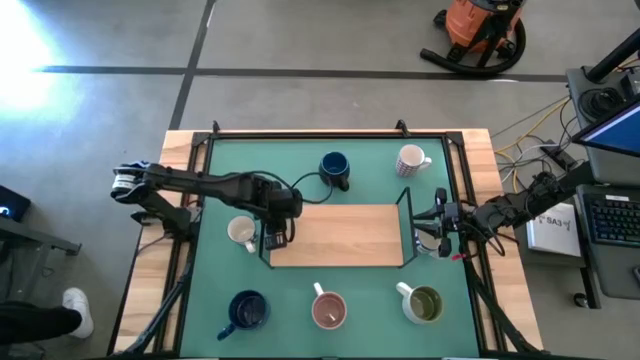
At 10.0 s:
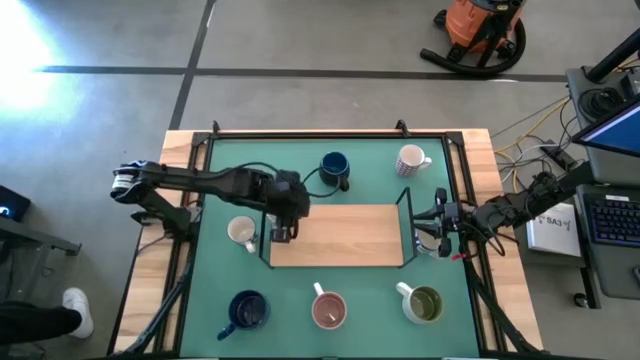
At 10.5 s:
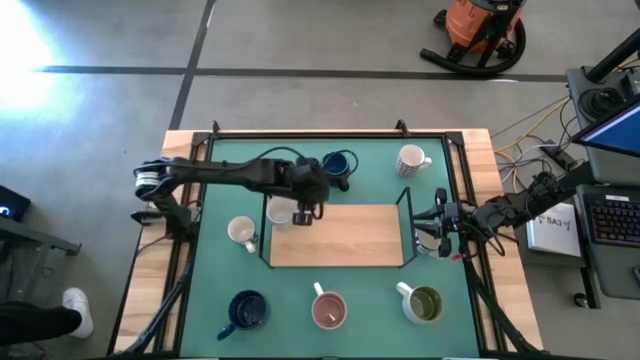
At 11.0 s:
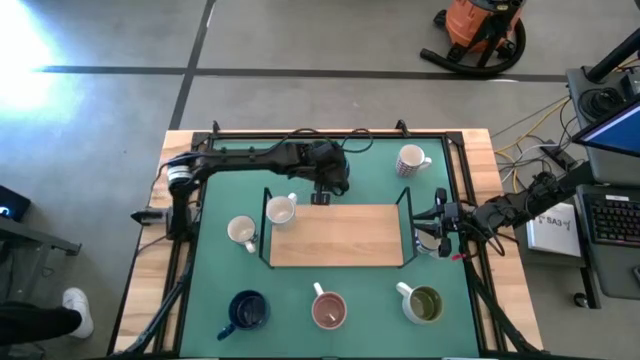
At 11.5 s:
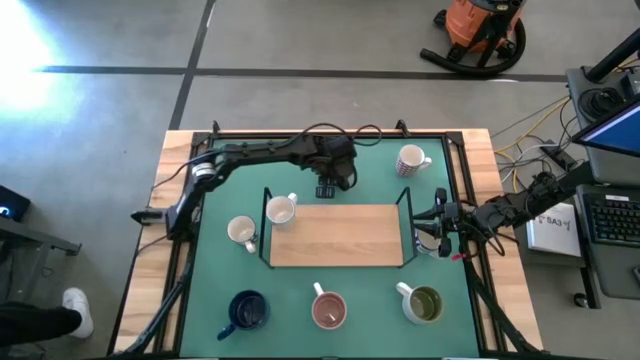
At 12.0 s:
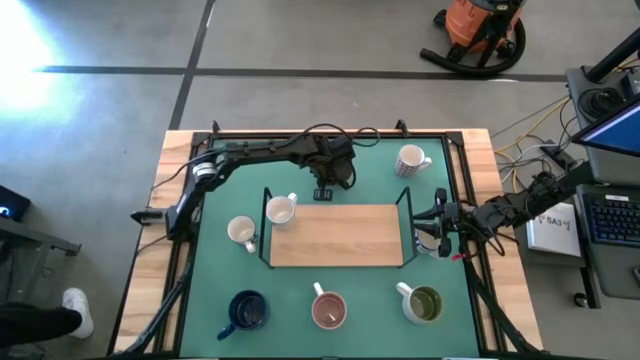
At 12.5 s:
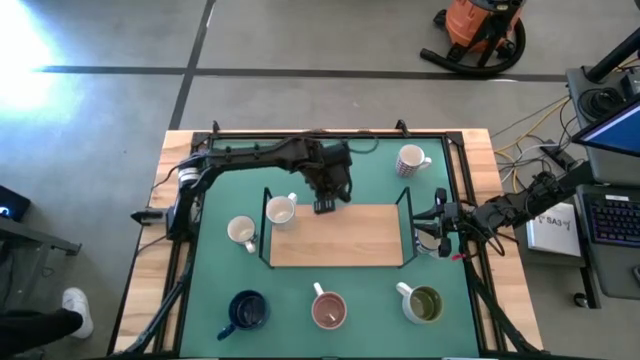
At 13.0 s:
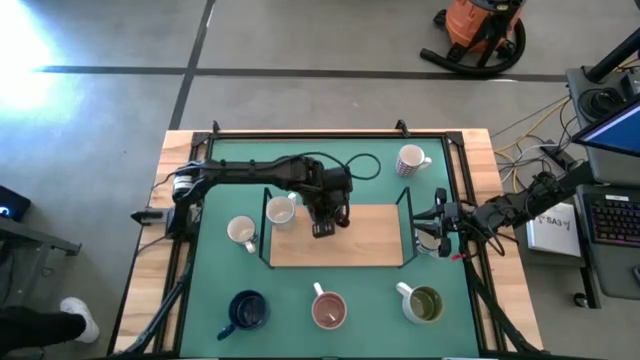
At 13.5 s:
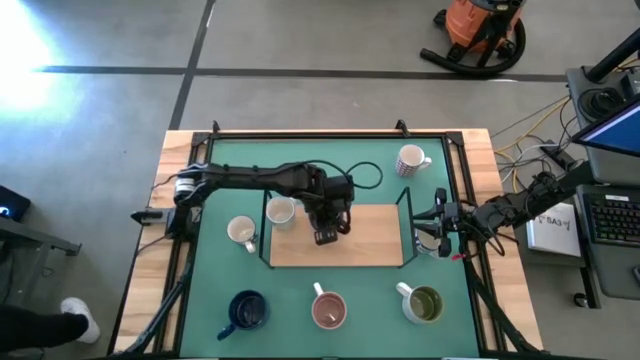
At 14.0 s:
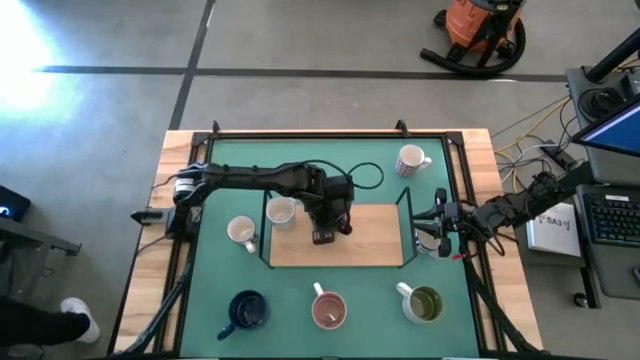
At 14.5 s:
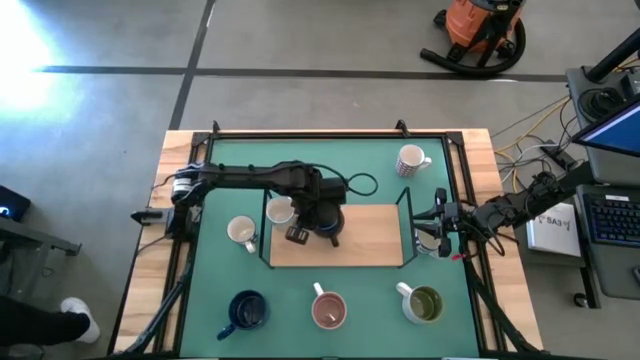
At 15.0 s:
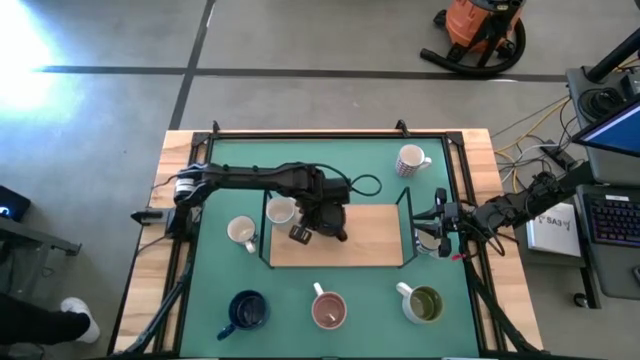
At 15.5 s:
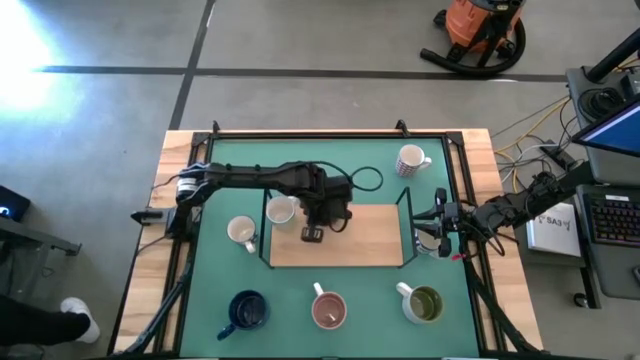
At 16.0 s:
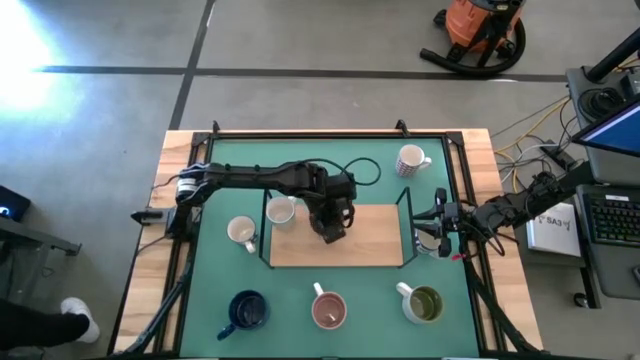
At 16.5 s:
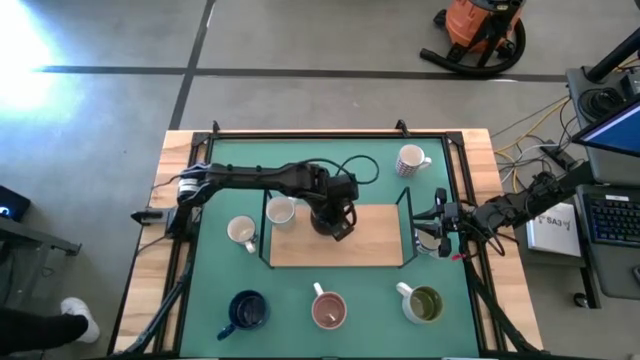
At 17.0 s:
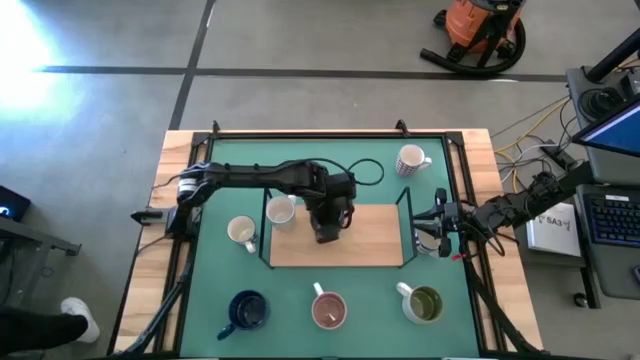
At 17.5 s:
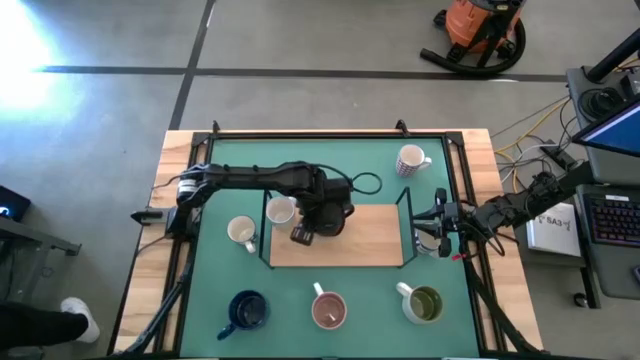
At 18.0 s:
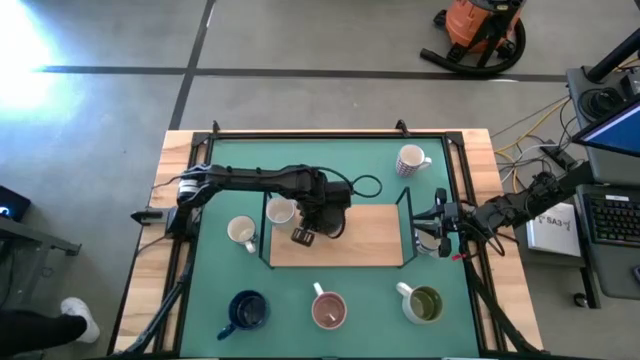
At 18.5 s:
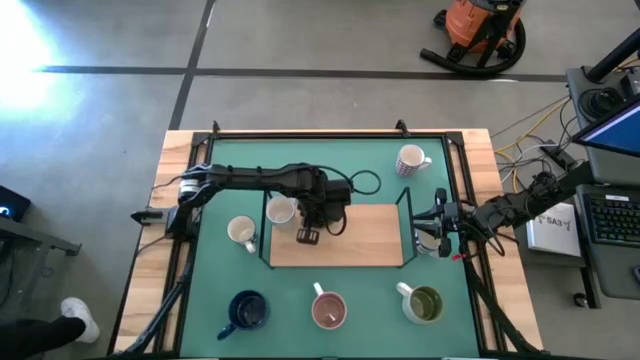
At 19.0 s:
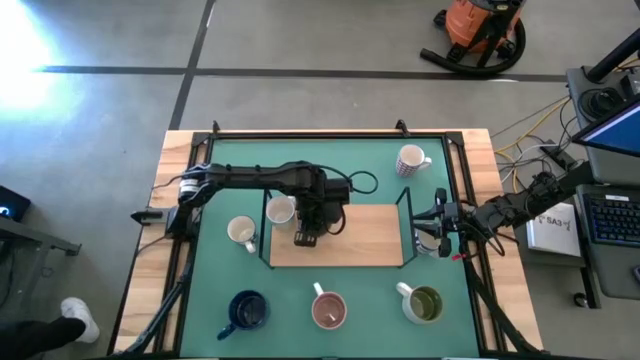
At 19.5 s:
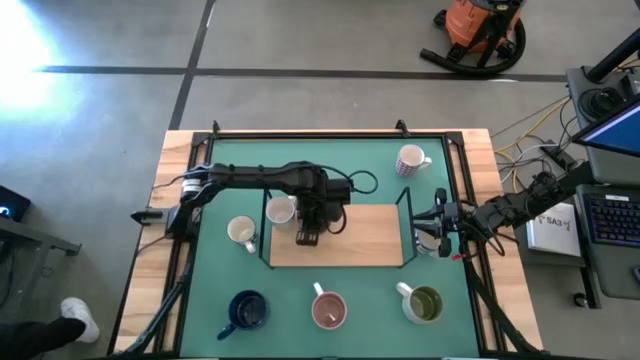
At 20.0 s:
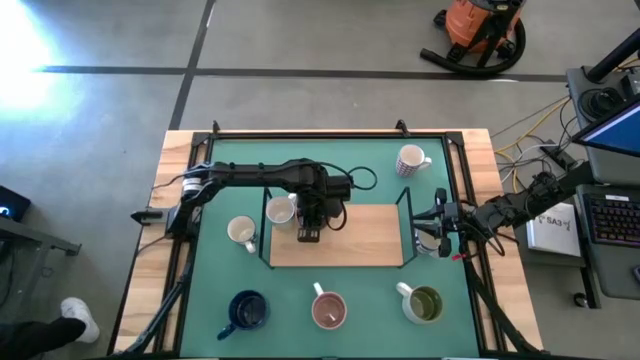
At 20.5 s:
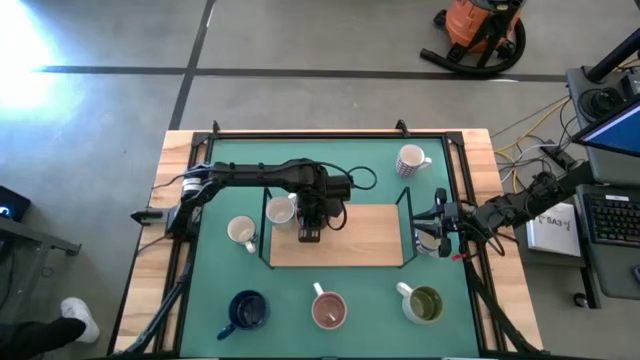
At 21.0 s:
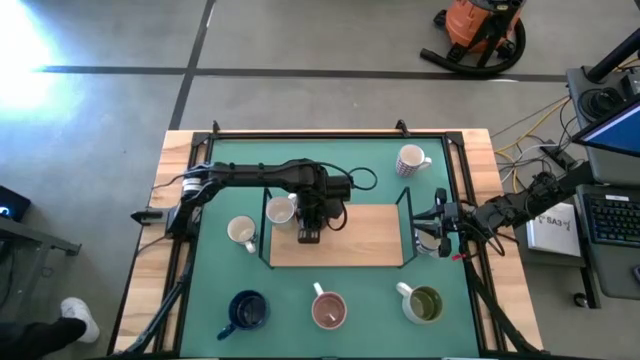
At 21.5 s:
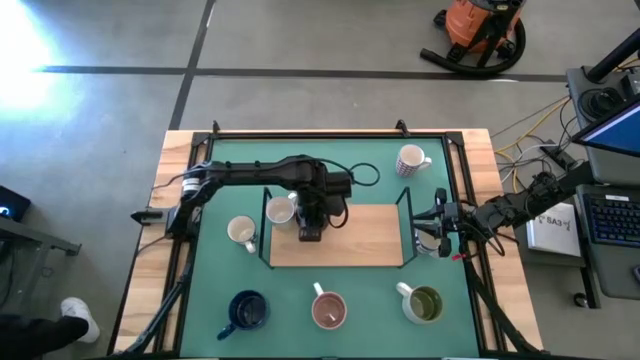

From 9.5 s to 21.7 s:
Task: Place coffee mugs
Put the black mug on the shelf

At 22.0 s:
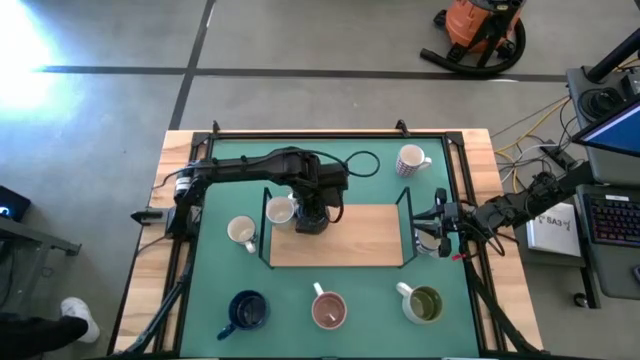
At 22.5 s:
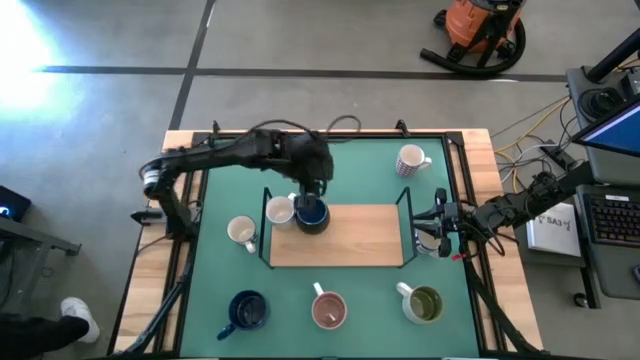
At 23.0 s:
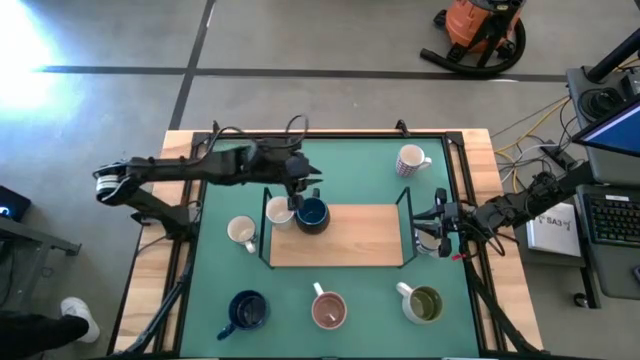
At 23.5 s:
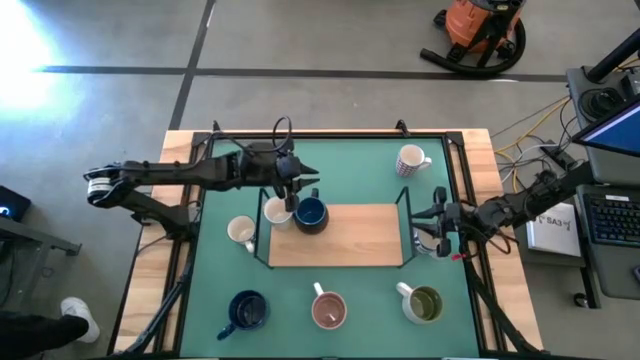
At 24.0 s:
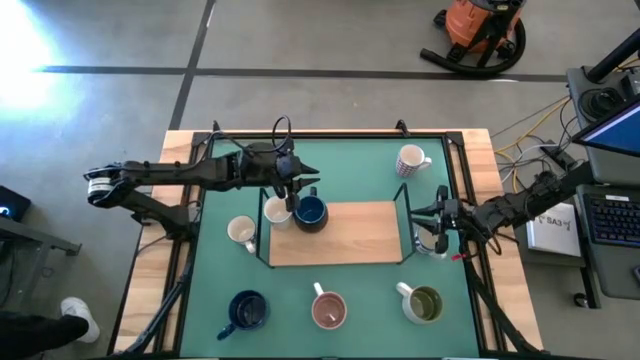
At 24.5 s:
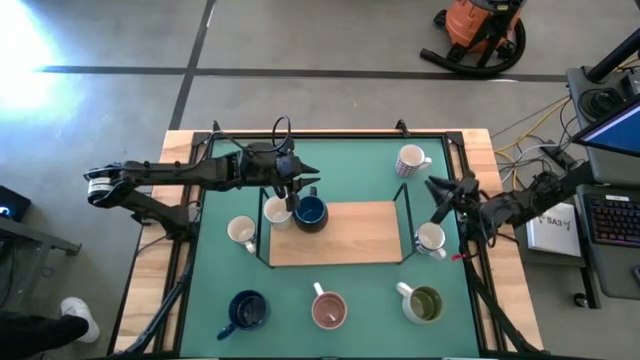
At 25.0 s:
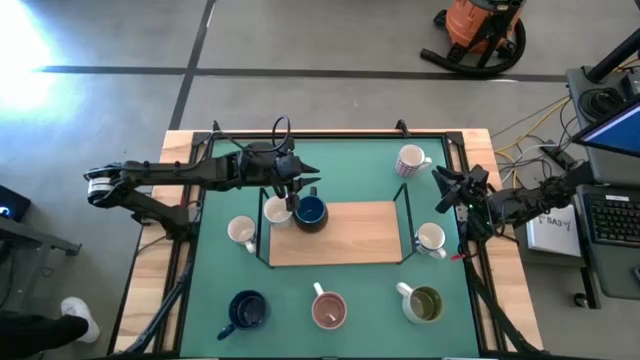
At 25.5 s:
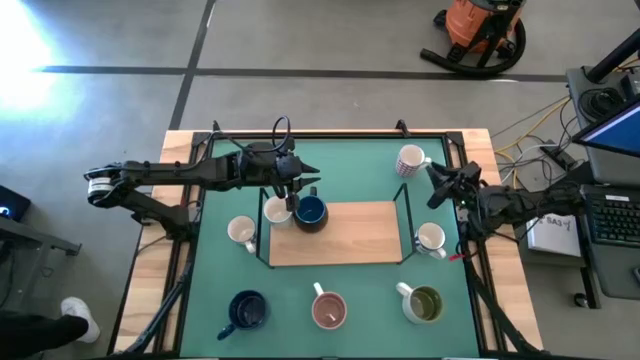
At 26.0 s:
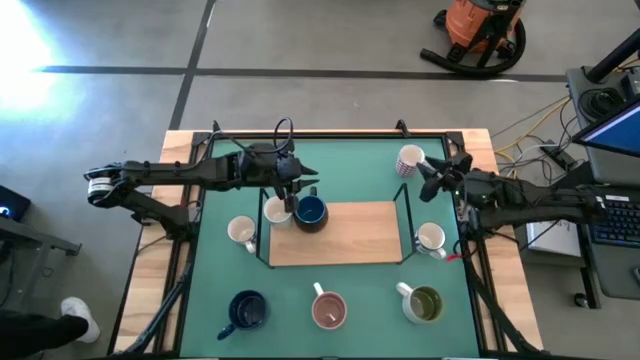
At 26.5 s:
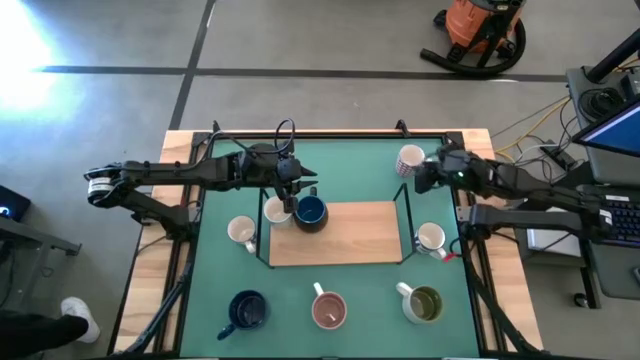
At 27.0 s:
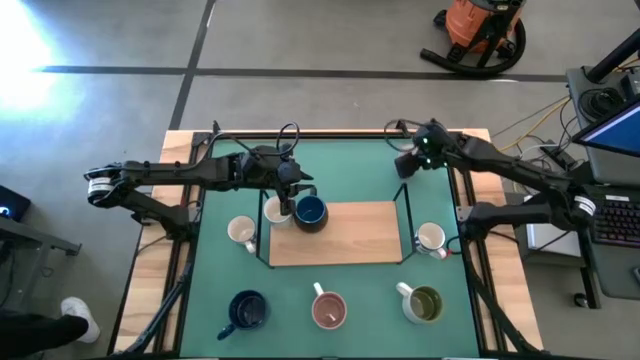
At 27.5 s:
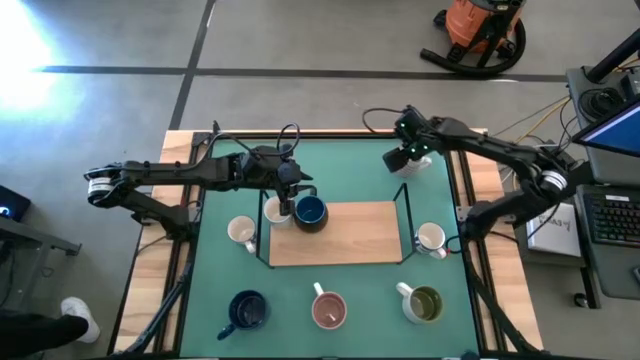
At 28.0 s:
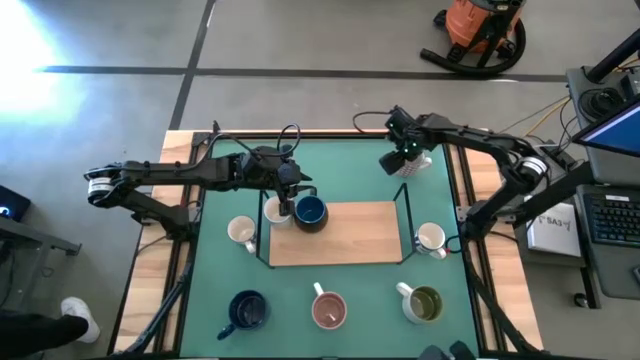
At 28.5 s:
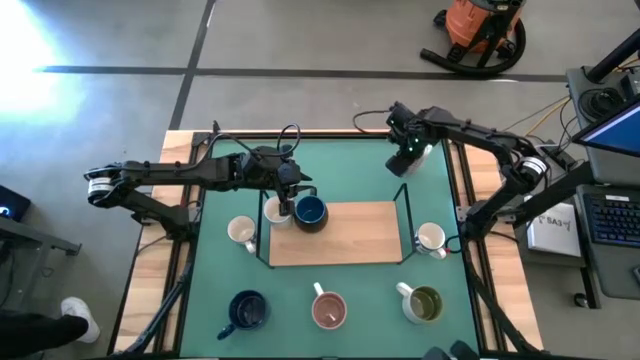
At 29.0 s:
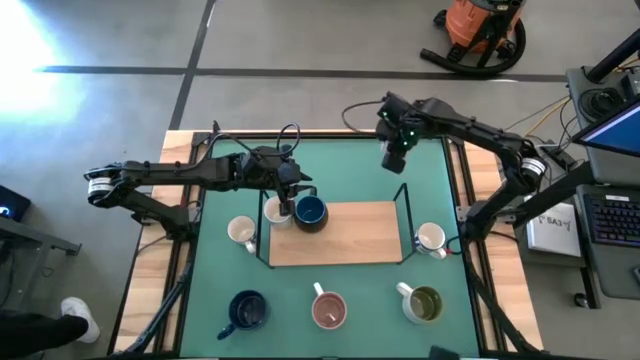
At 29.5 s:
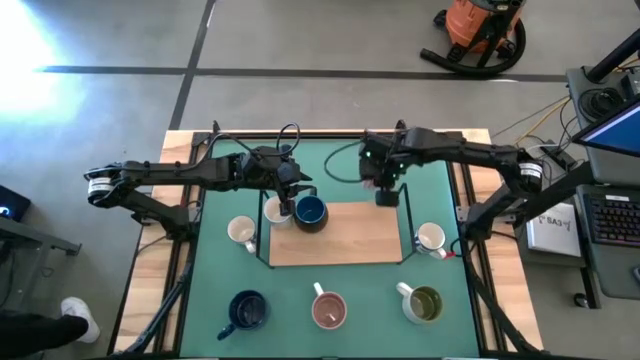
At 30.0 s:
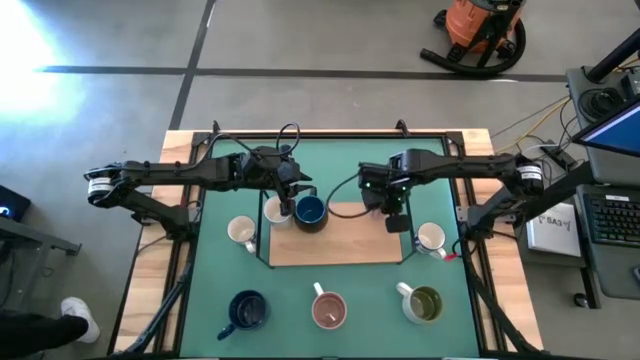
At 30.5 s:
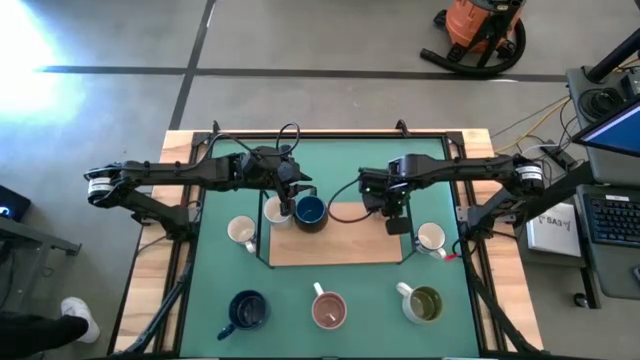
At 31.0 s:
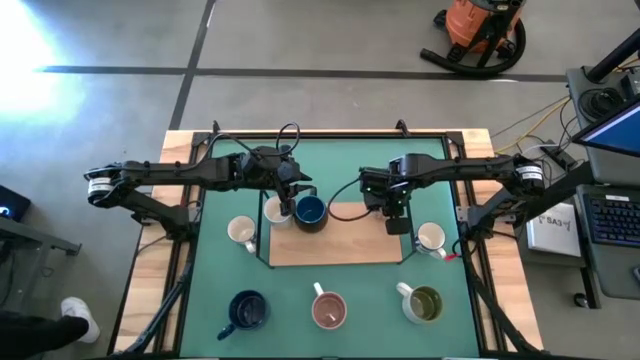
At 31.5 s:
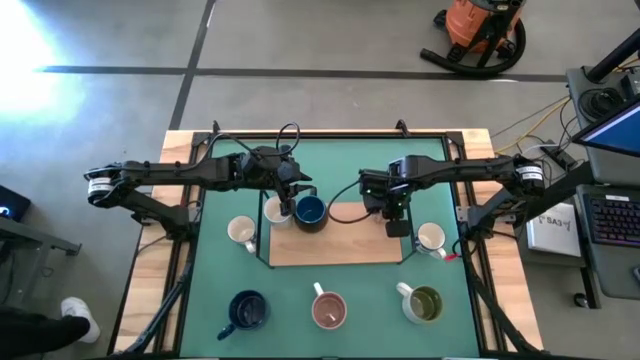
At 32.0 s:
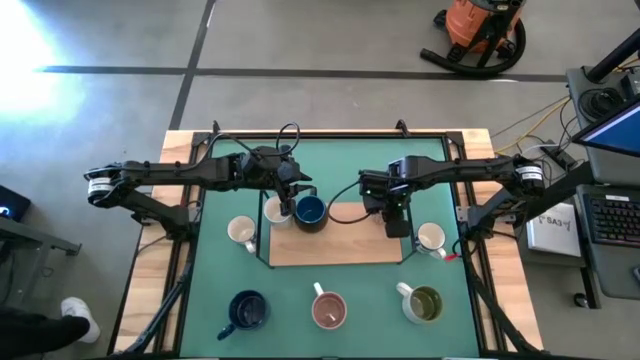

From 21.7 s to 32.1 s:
Put the red patterned mug on the shelf
